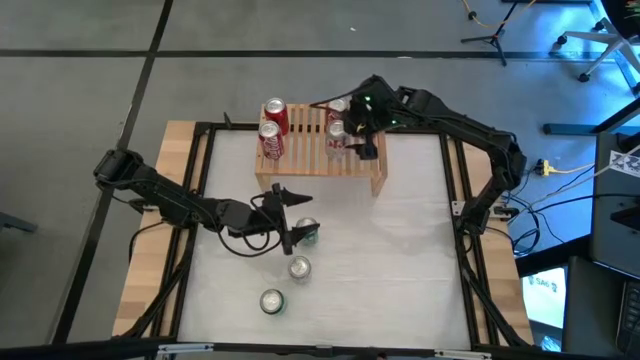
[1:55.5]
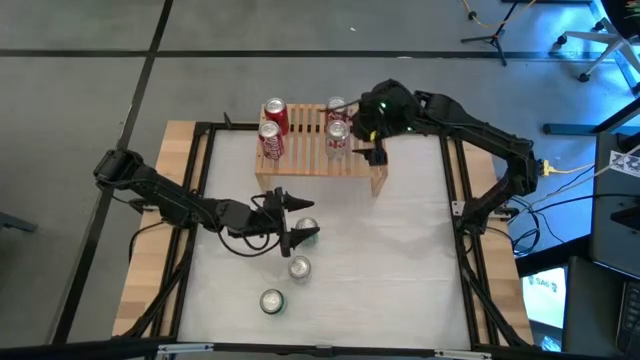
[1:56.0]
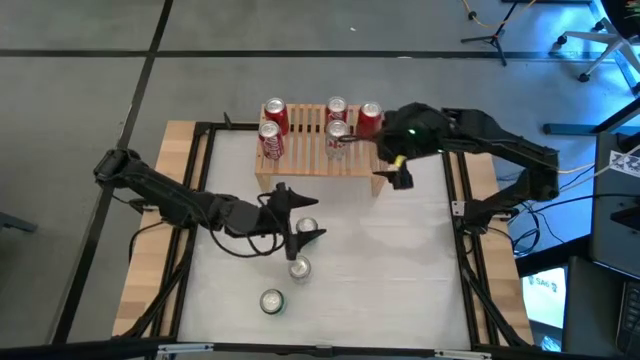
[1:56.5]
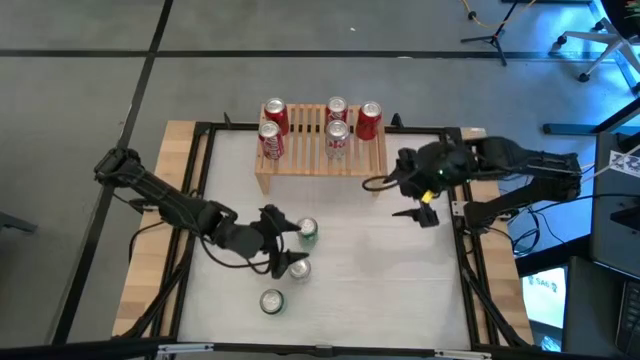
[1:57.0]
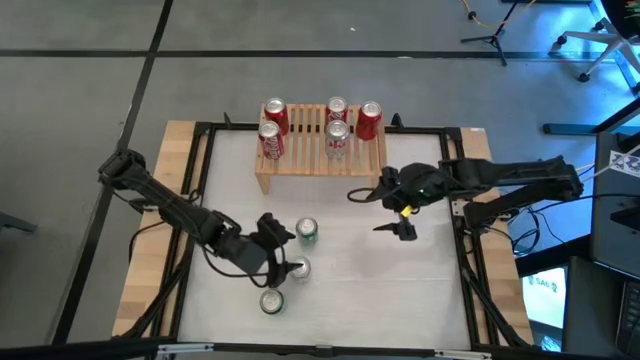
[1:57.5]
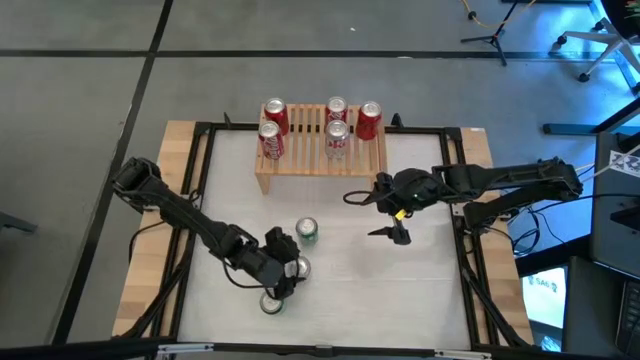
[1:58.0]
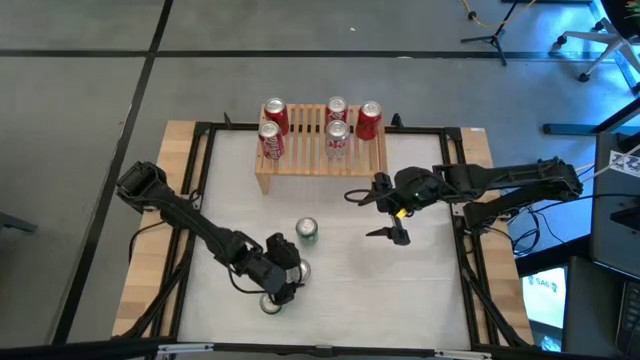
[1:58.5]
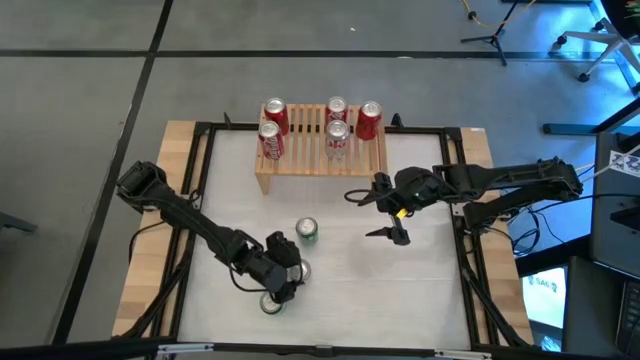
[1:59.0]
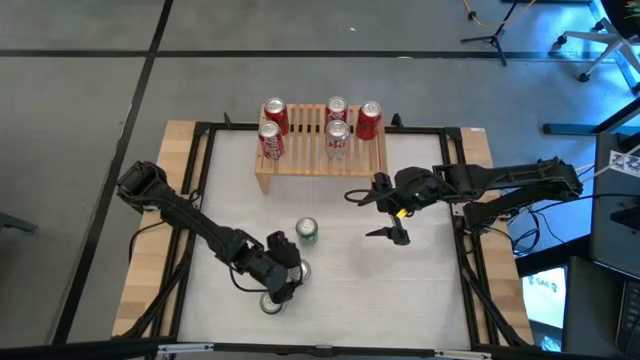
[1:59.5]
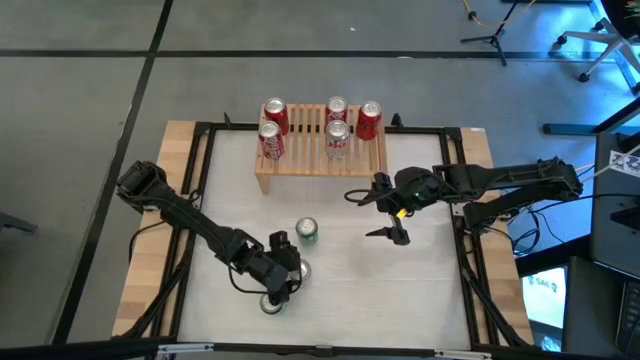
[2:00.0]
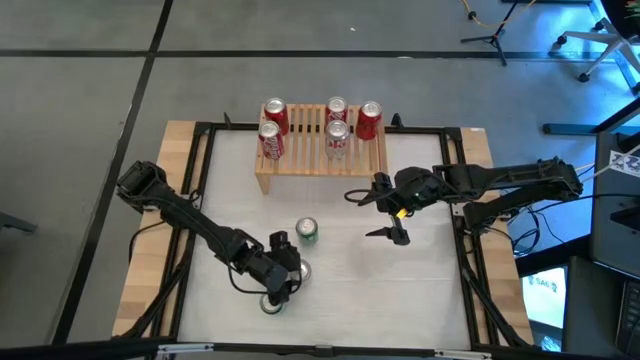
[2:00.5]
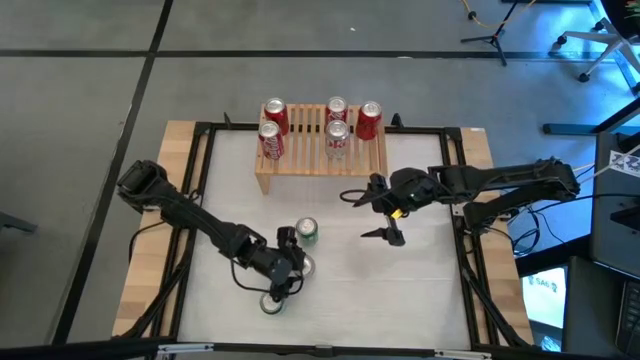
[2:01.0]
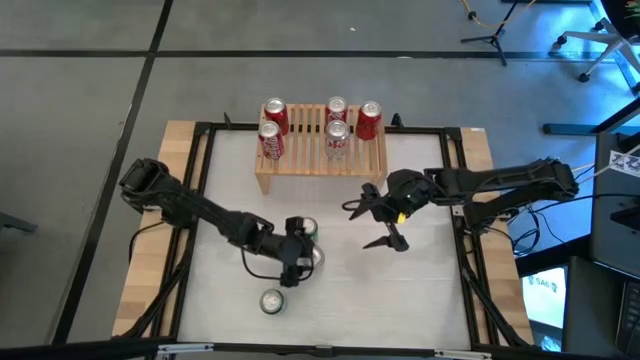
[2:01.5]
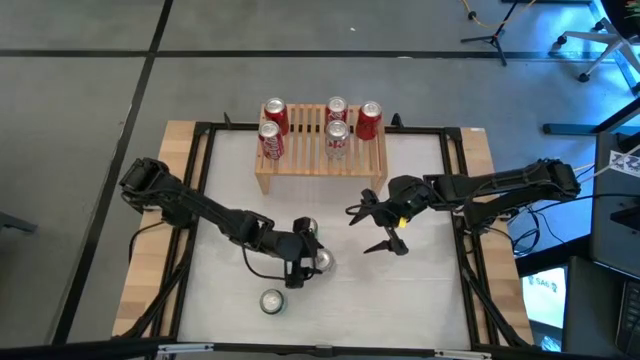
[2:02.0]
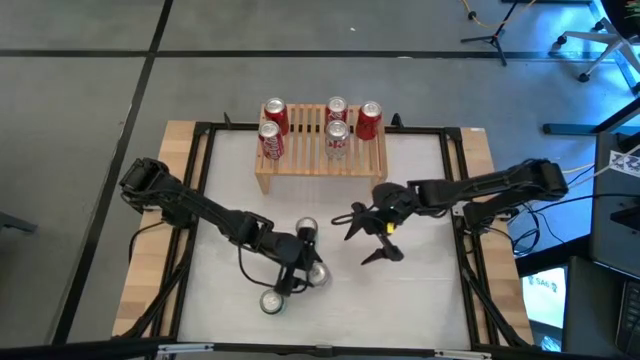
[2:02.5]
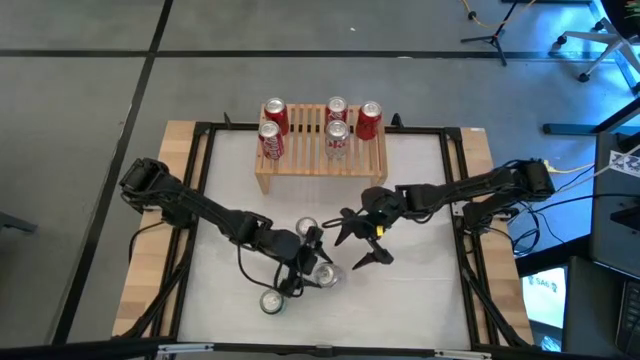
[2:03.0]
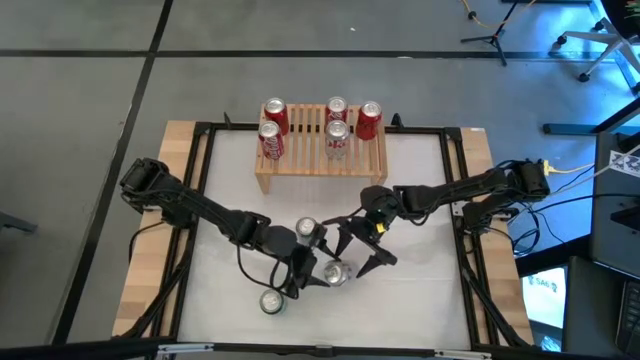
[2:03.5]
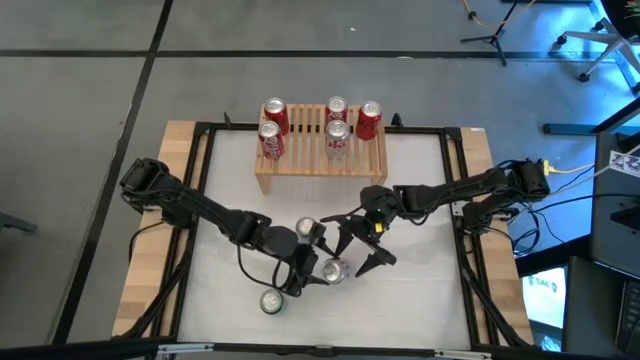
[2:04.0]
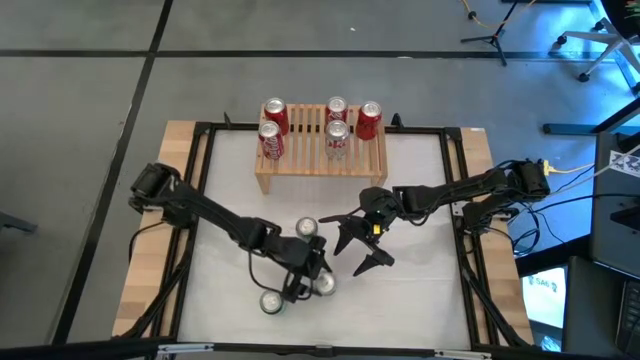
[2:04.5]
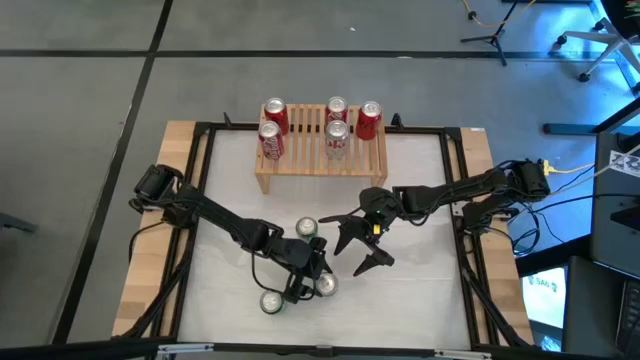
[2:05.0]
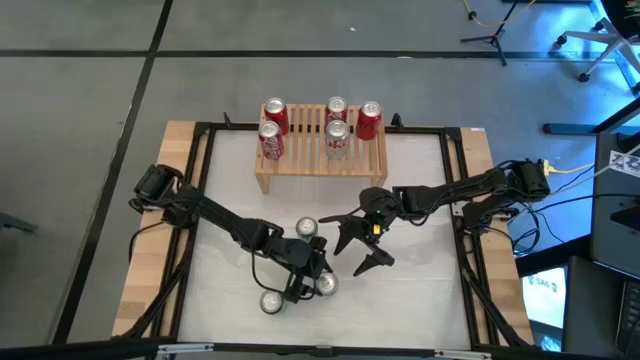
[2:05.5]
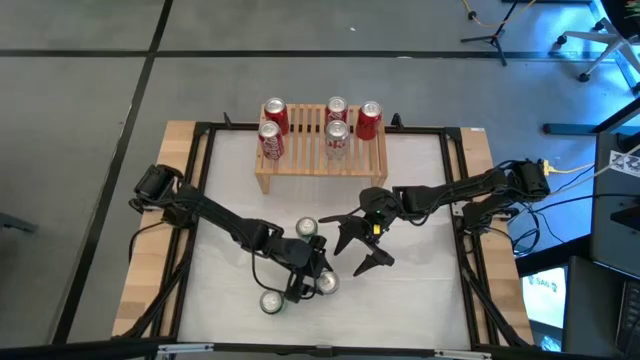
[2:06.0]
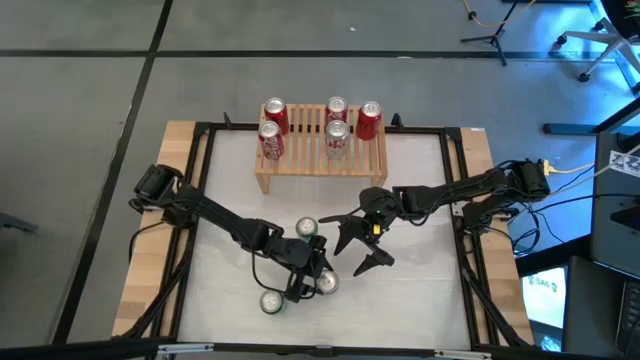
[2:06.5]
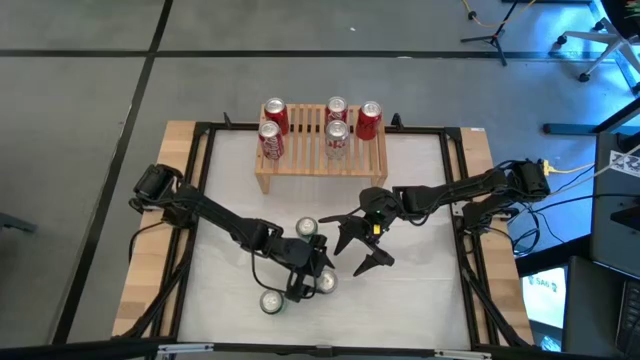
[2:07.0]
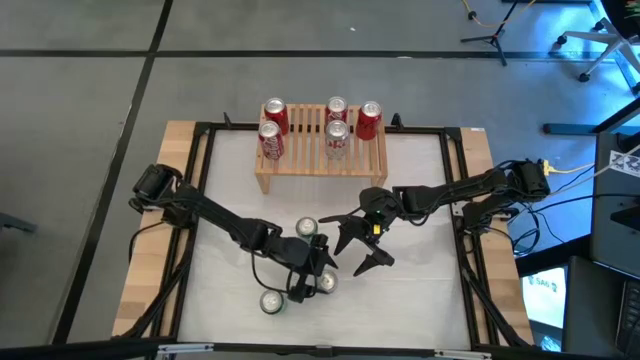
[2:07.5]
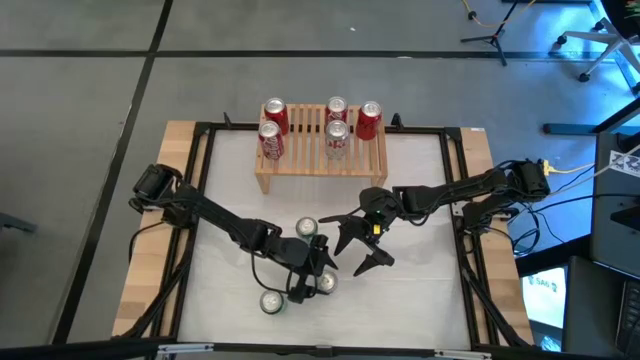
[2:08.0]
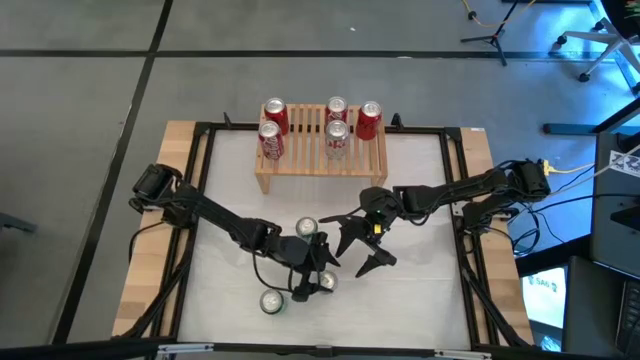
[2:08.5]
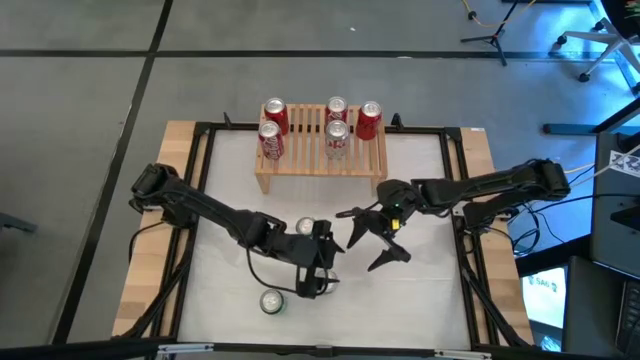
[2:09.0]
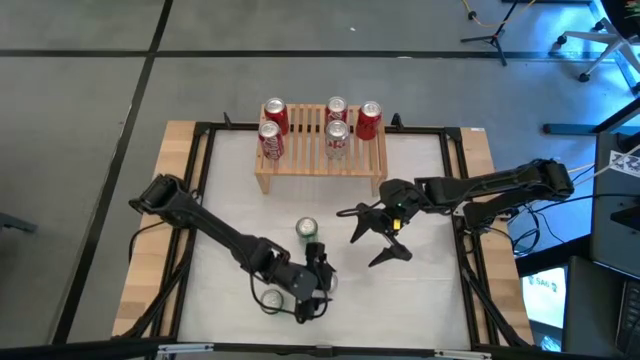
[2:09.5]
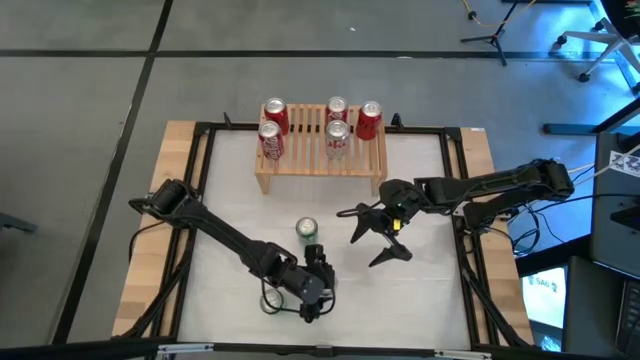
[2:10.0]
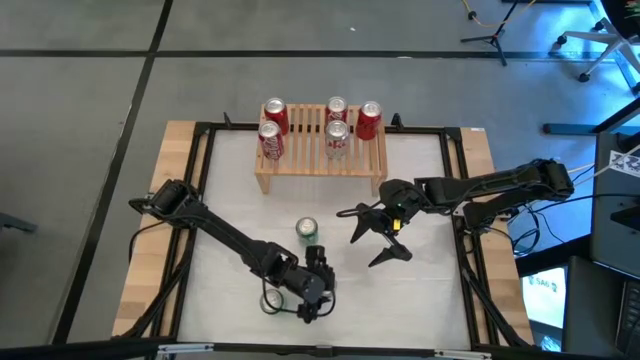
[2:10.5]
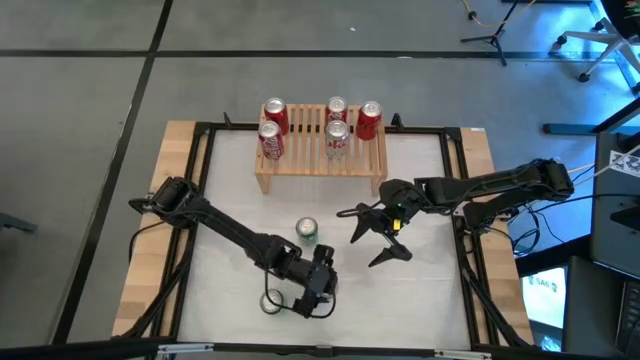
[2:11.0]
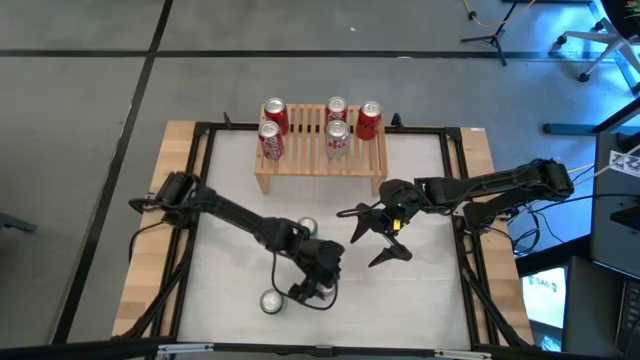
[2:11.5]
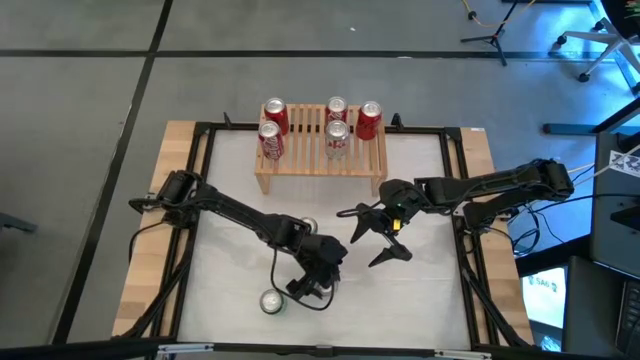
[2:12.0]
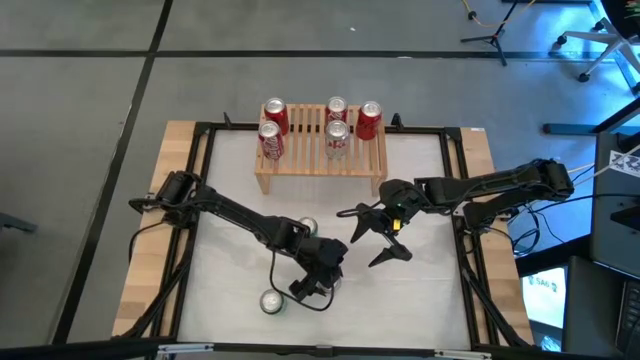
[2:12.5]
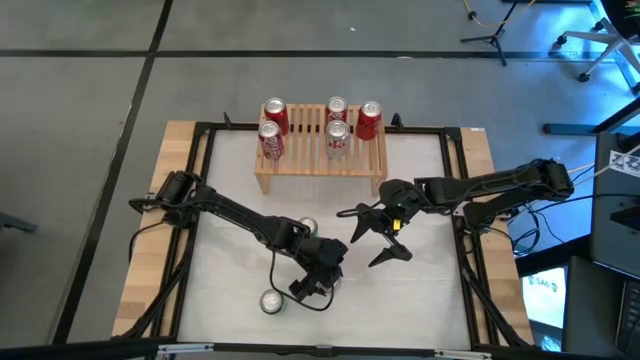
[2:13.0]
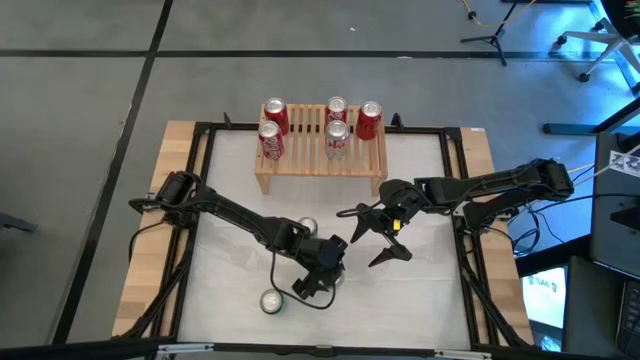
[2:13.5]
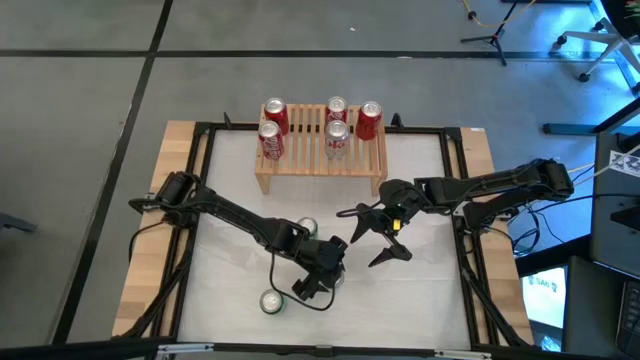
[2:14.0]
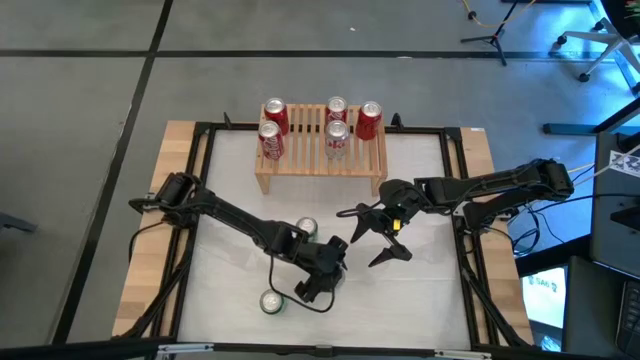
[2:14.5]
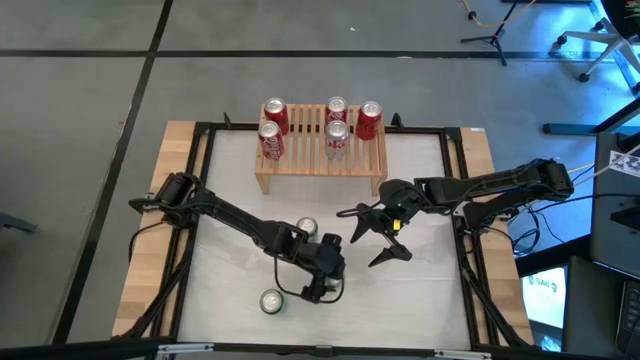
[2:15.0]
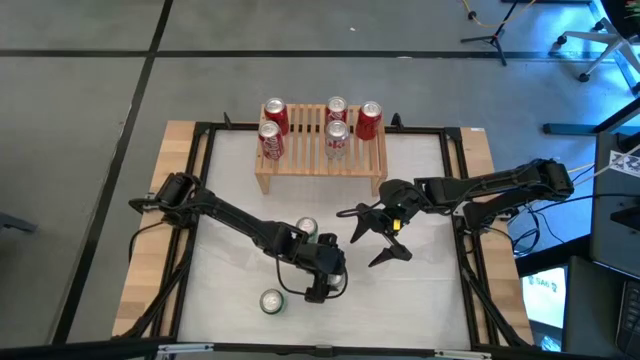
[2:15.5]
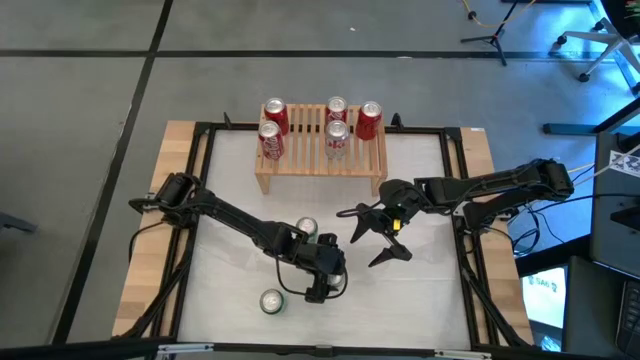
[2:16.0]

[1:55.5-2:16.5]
Task: Place canned beverage on shelf
Put the red silver soda can on the shelf
